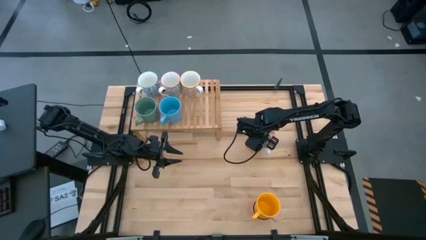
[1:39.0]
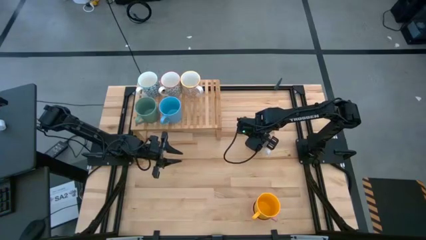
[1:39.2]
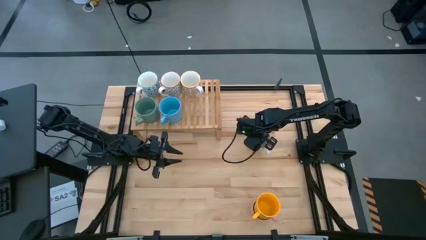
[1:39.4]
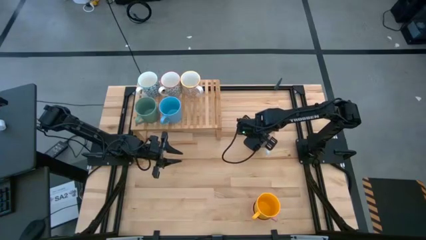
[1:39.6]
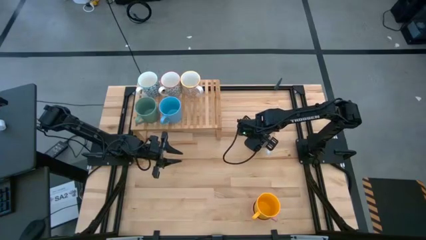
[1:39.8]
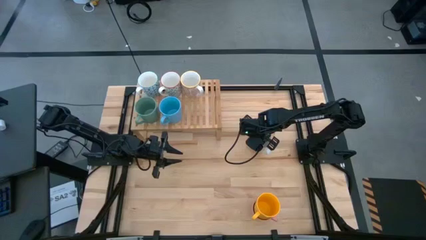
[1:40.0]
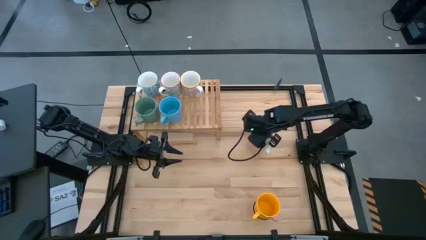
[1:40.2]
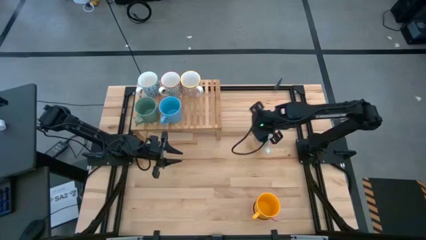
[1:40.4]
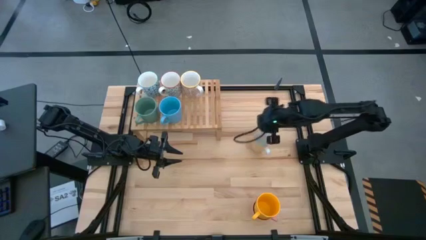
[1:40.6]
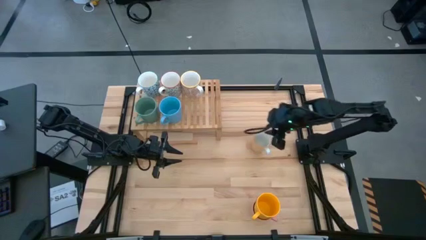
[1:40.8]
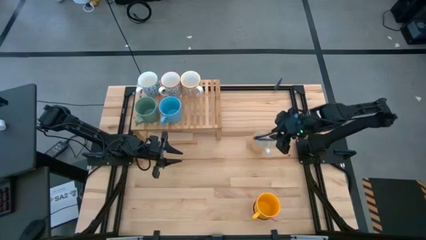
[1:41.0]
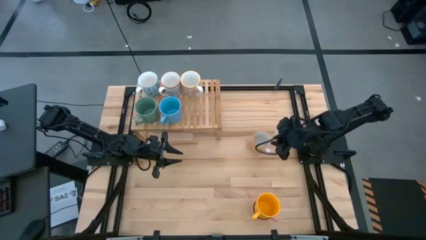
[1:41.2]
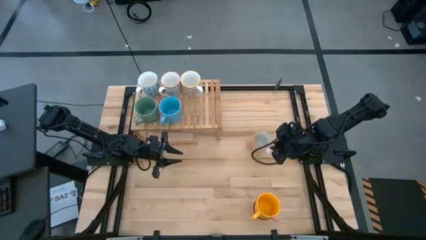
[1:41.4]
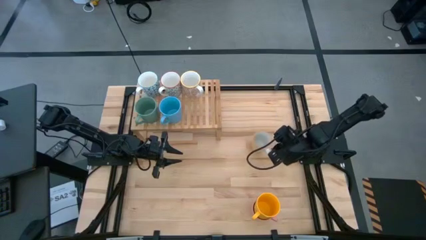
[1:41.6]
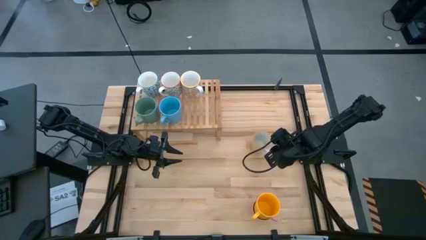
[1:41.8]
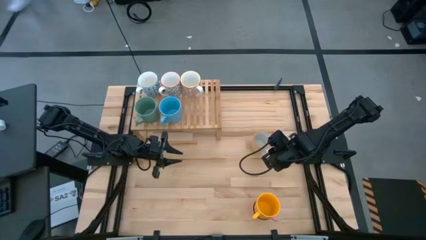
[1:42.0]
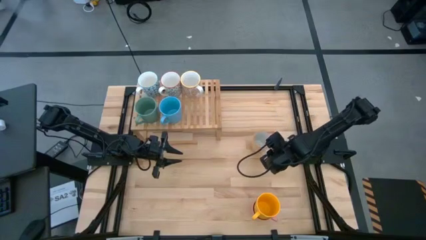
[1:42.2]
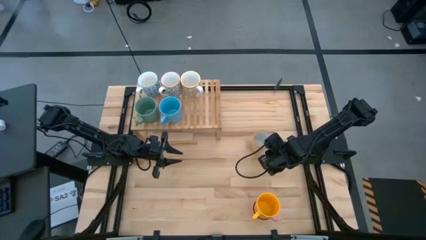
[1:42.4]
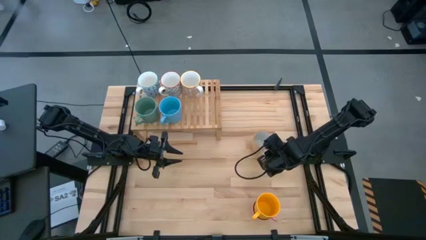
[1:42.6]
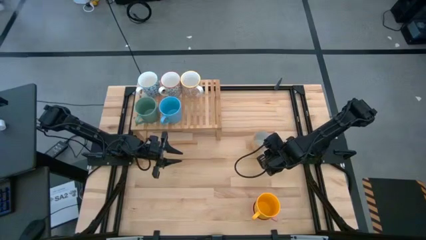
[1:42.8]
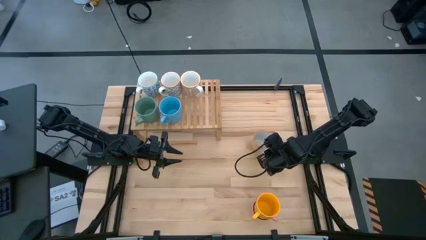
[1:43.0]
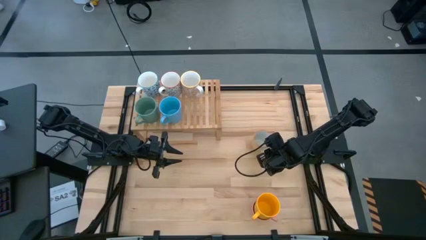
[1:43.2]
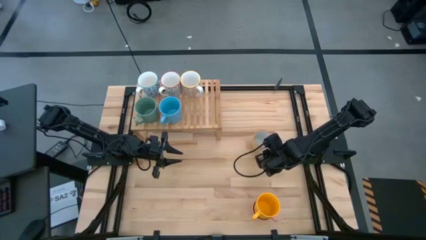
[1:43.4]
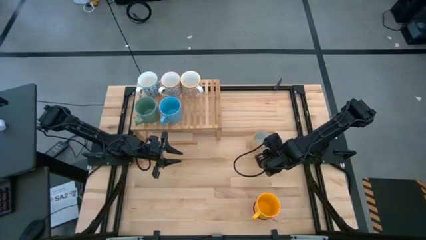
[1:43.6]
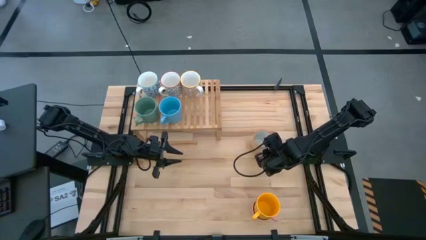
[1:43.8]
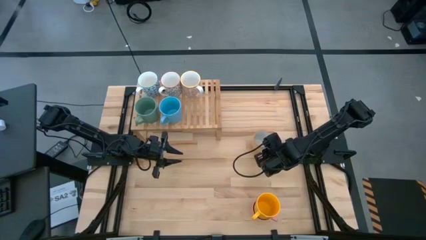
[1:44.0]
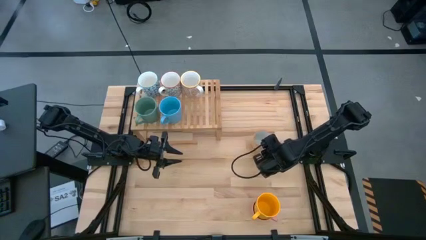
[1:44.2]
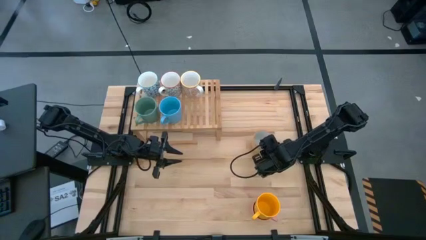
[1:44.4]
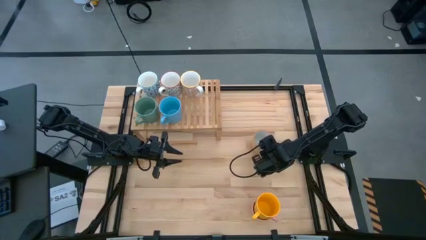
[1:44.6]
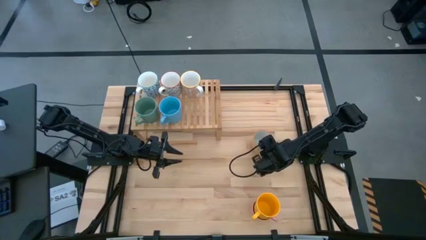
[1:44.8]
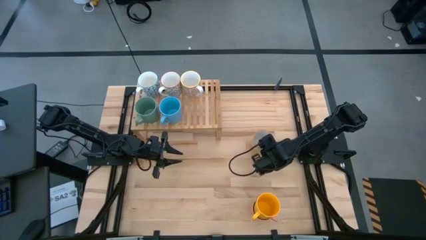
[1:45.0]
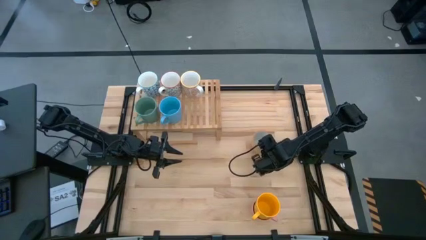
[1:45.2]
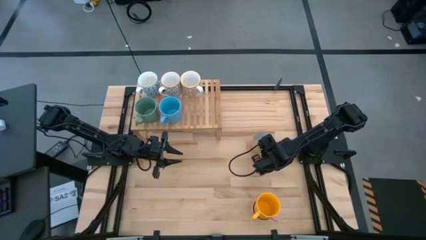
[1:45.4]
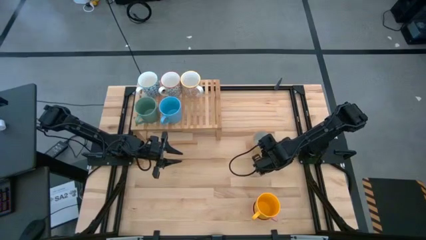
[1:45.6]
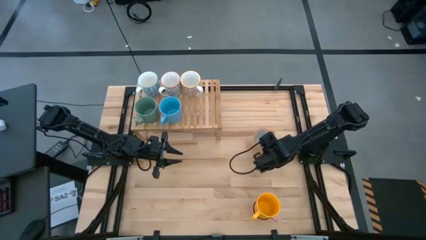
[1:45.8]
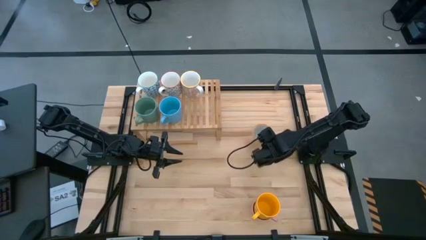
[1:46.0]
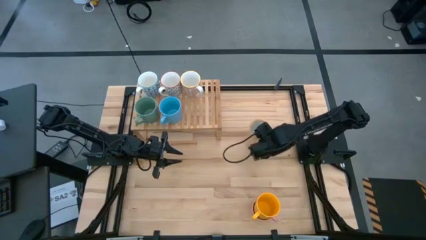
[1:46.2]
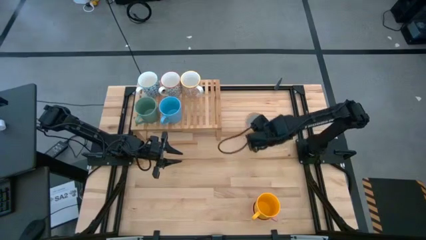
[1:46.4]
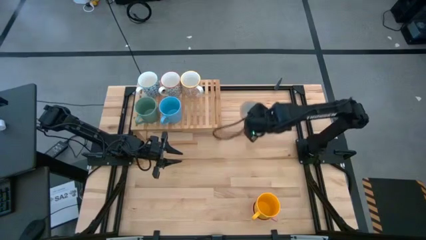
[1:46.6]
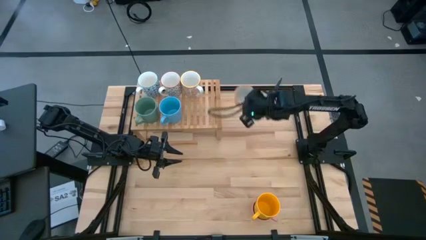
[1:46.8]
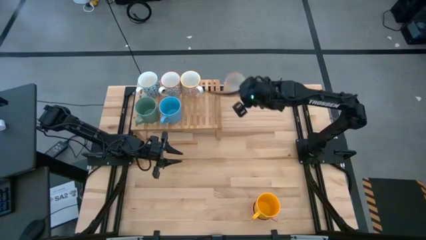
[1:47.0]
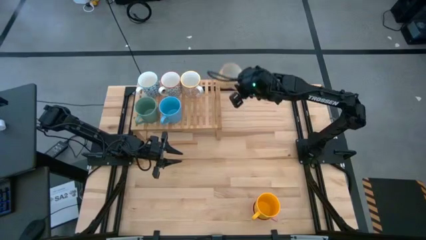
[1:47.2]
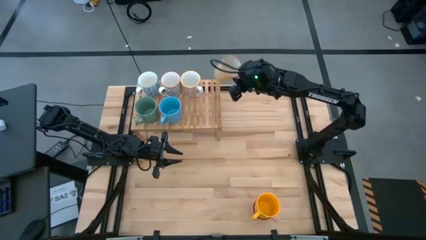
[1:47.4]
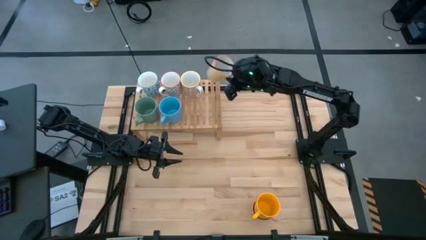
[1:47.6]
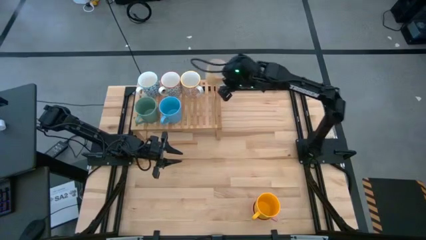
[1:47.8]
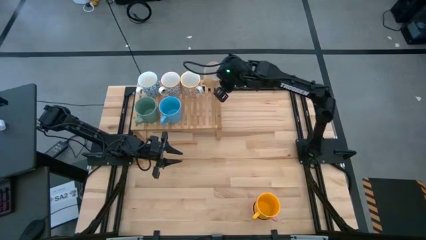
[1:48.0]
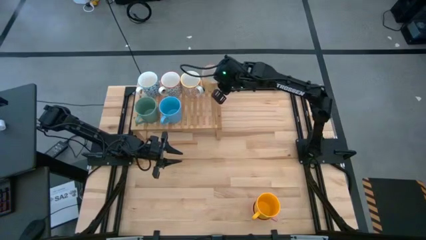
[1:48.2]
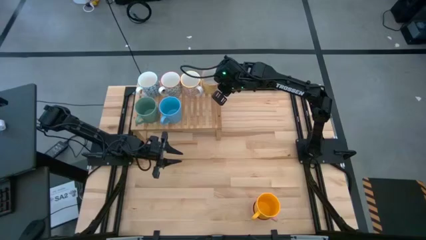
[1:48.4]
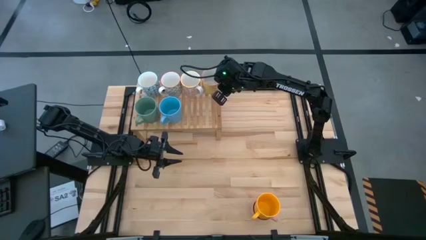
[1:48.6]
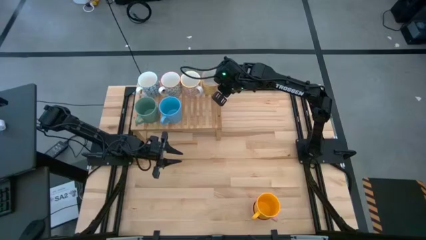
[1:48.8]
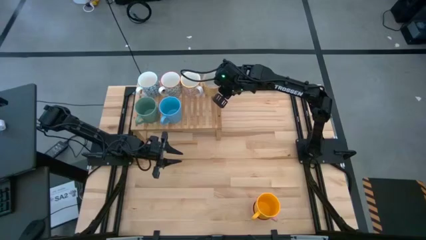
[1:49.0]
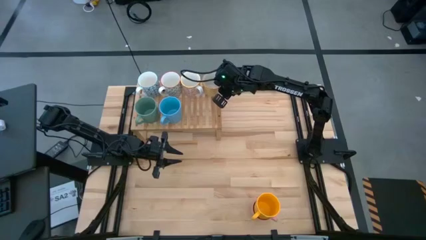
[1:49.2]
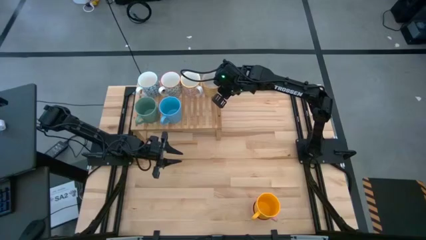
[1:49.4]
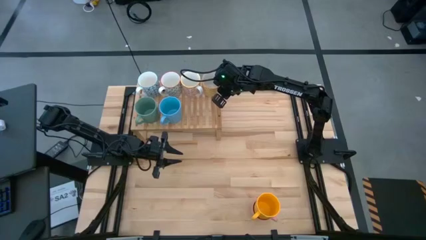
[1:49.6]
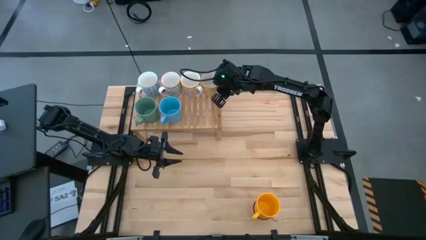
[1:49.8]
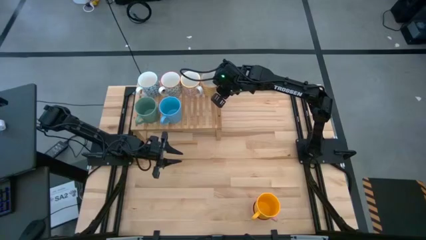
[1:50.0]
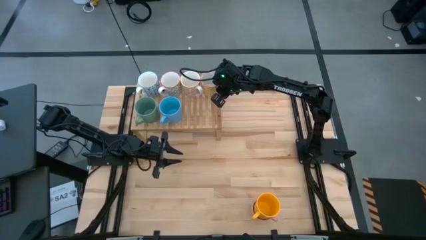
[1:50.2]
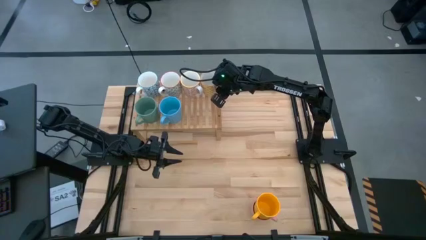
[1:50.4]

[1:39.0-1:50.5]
Task: Place coffee mugs
Put the white-yellow patterned mug on the shelf

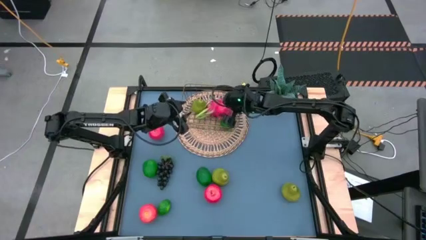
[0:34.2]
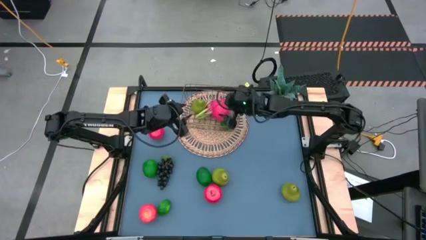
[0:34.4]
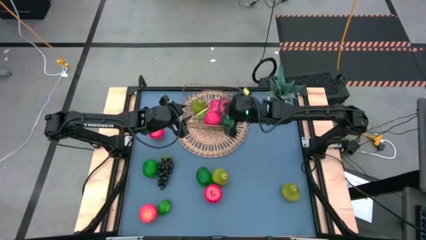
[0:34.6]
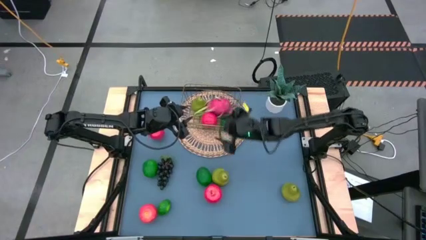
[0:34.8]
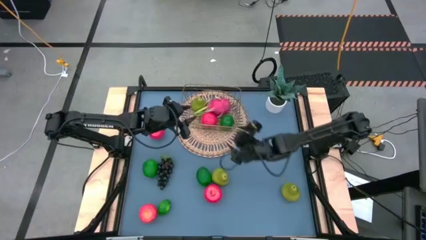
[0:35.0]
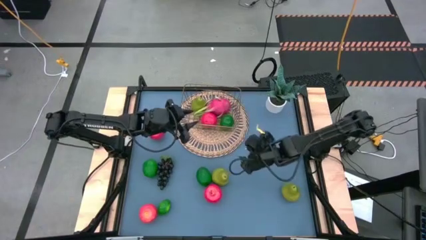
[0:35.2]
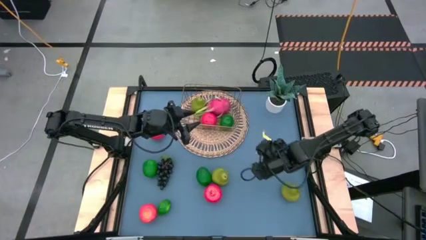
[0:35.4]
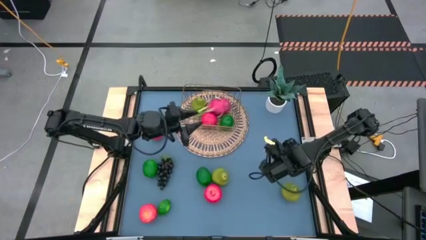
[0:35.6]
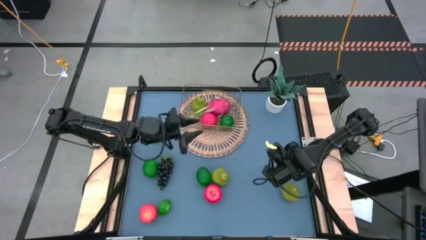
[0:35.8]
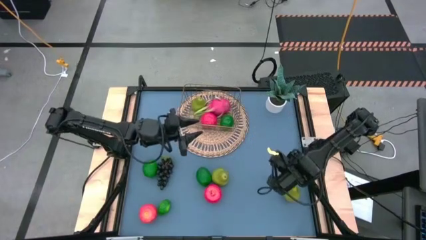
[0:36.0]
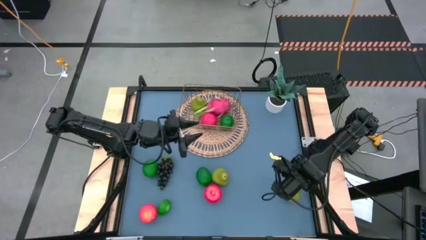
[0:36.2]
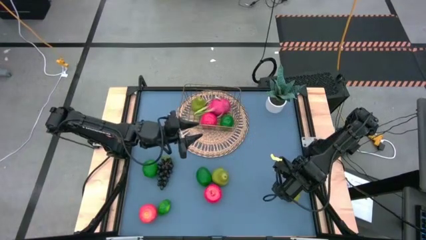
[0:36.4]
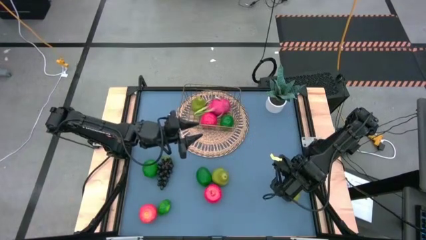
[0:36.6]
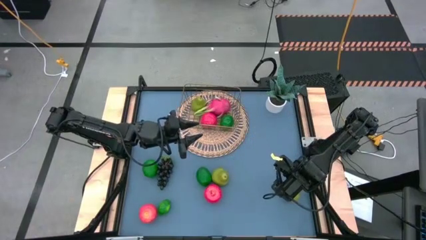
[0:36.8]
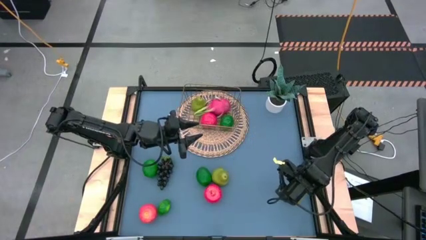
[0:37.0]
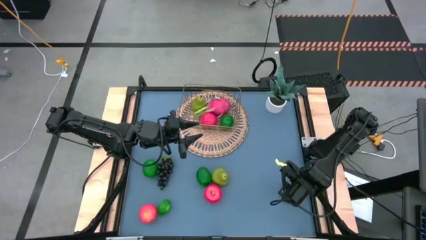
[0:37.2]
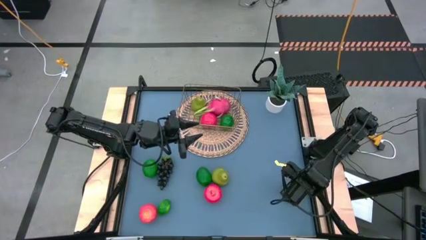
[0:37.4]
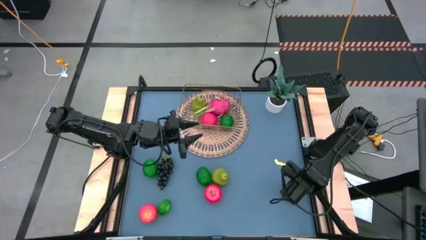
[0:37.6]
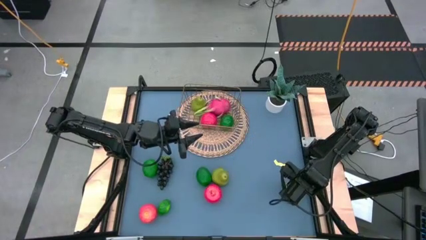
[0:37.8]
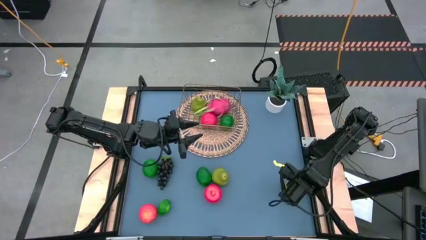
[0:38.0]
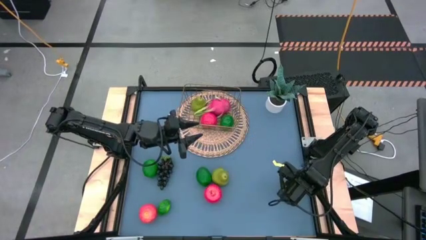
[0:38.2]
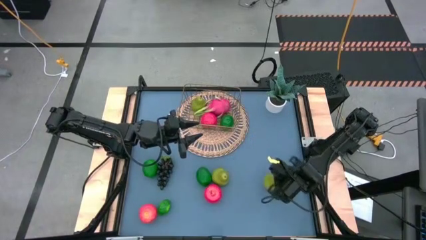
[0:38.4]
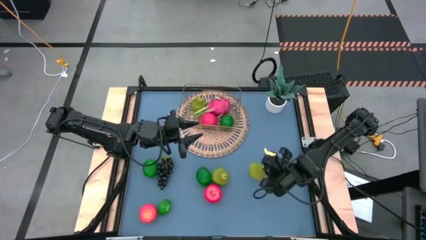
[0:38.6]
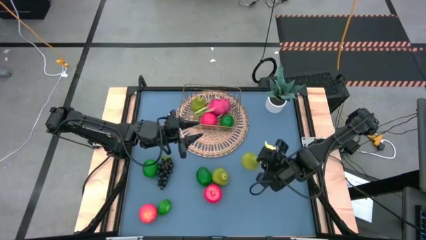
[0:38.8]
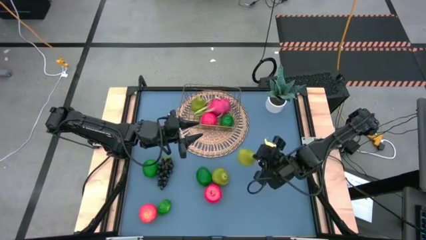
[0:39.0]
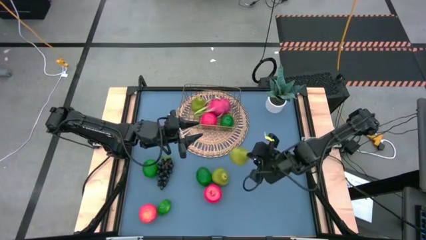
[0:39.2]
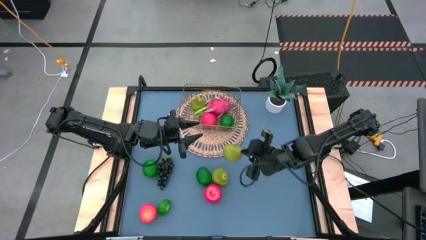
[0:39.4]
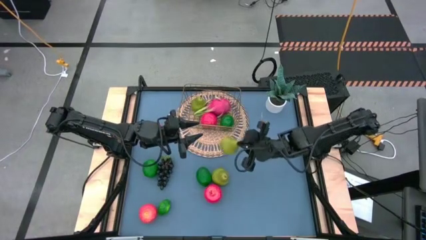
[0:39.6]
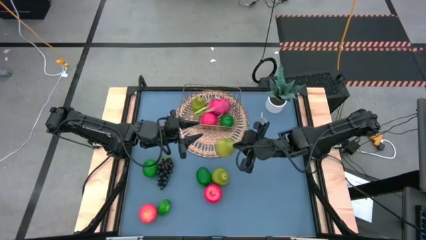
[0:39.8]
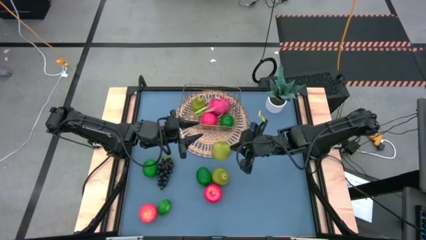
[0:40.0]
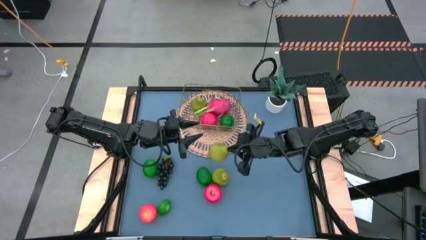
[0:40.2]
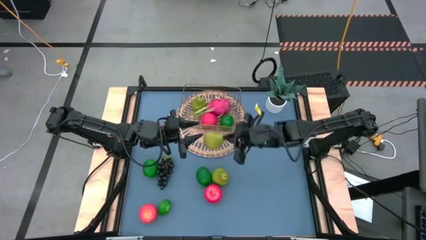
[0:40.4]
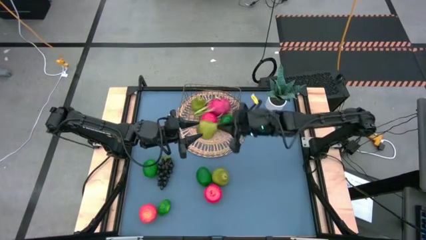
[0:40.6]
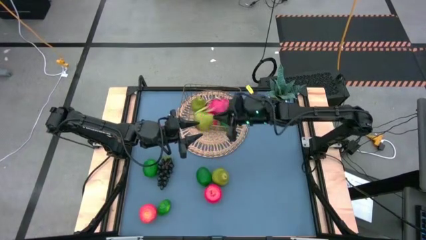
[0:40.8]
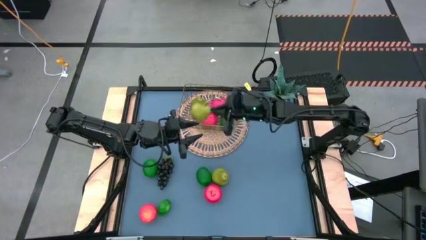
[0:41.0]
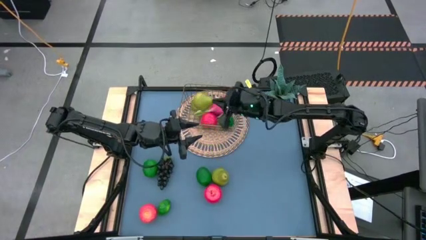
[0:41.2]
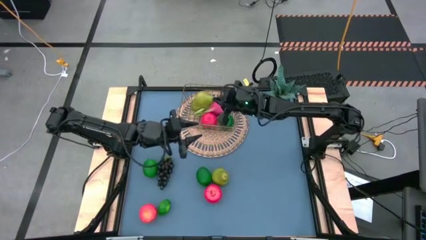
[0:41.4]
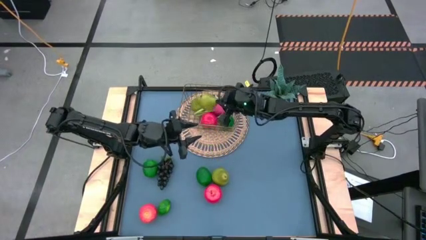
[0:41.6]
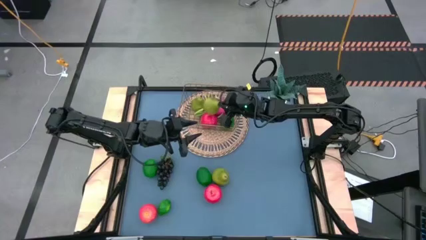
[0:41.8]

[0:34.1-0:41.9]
Task: Build produce basket
Put the green pear into the gold wire basket
